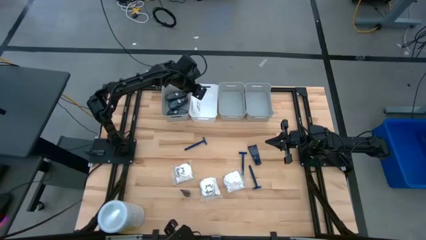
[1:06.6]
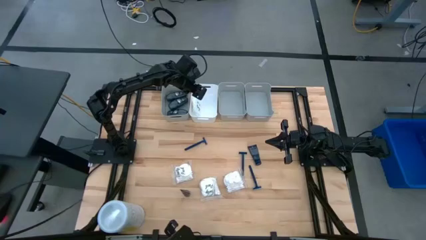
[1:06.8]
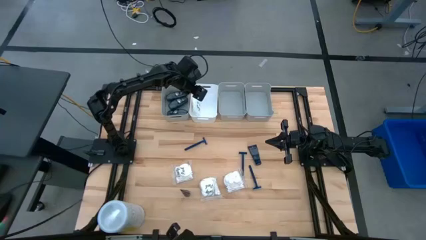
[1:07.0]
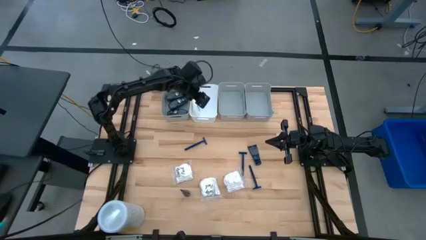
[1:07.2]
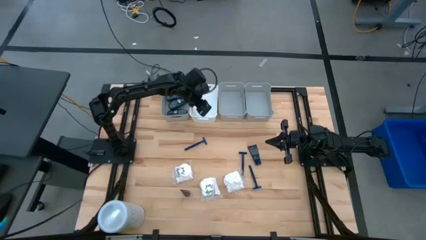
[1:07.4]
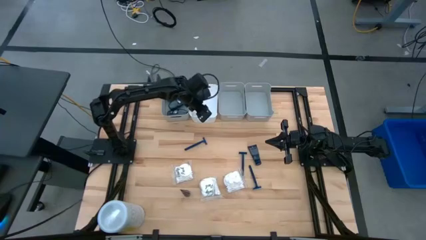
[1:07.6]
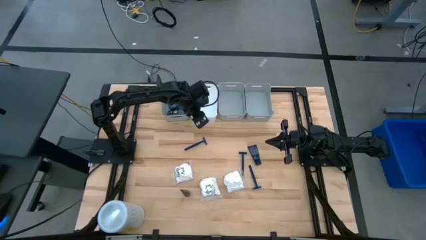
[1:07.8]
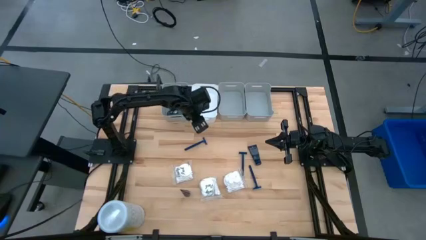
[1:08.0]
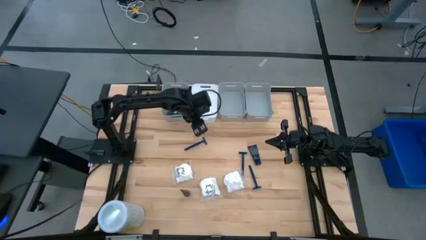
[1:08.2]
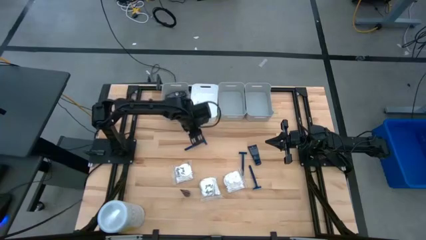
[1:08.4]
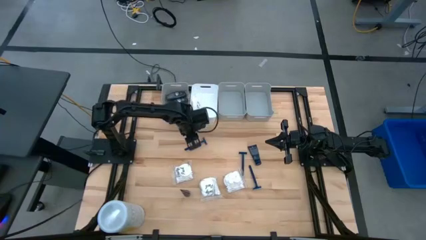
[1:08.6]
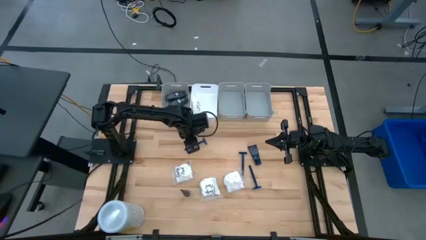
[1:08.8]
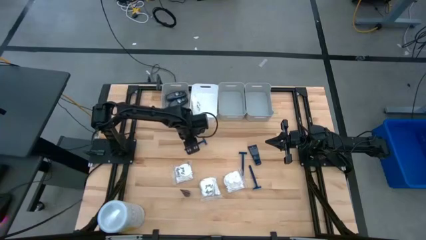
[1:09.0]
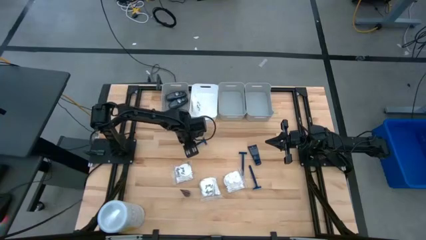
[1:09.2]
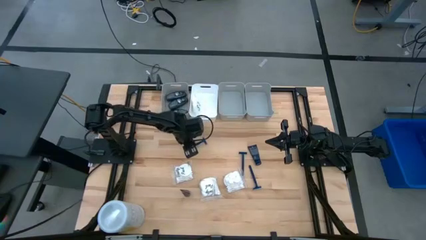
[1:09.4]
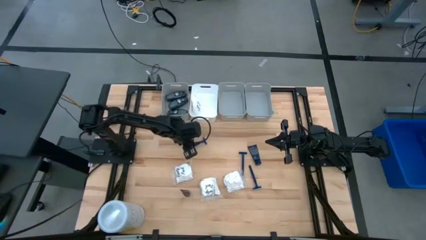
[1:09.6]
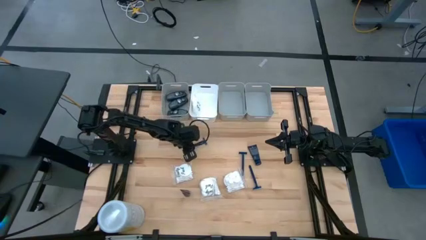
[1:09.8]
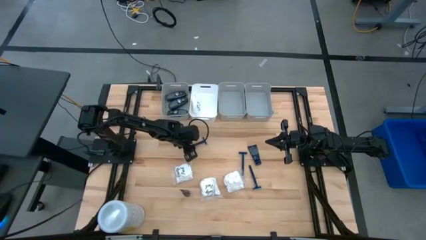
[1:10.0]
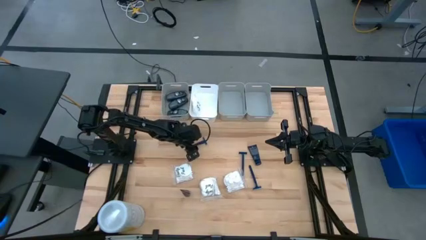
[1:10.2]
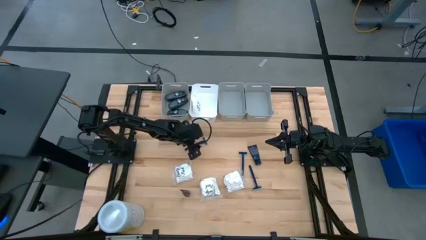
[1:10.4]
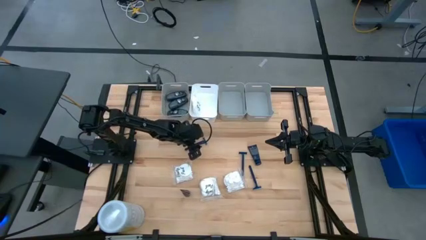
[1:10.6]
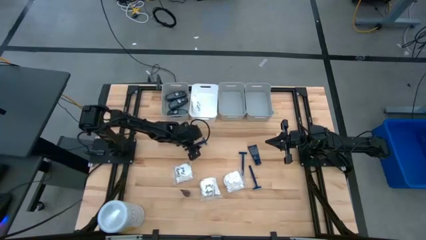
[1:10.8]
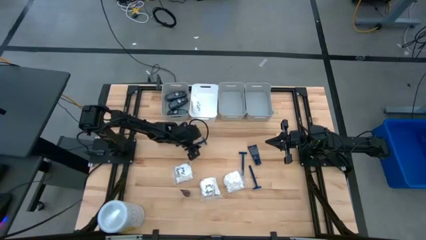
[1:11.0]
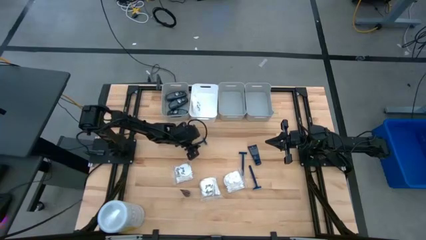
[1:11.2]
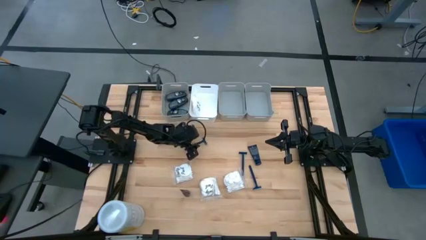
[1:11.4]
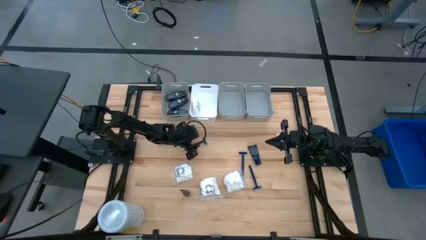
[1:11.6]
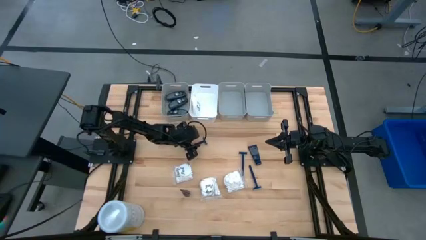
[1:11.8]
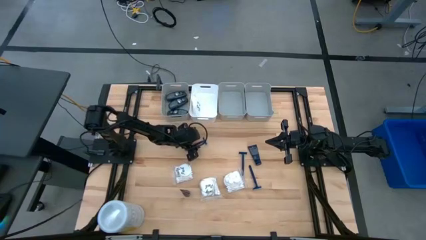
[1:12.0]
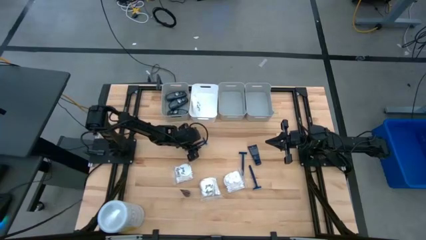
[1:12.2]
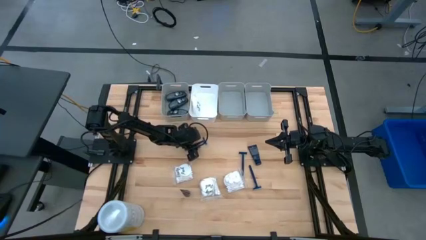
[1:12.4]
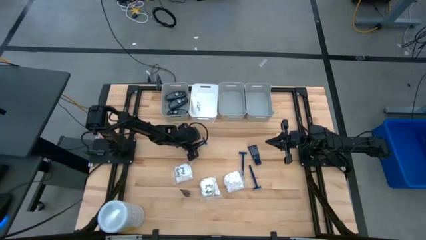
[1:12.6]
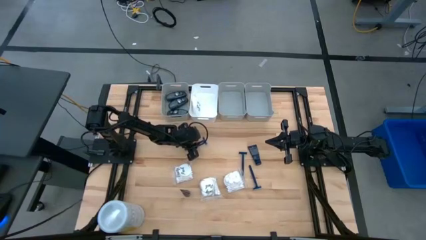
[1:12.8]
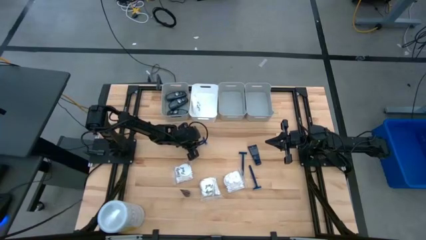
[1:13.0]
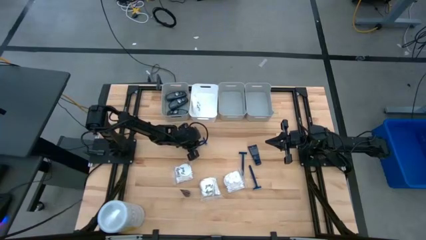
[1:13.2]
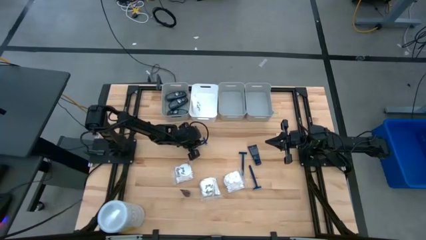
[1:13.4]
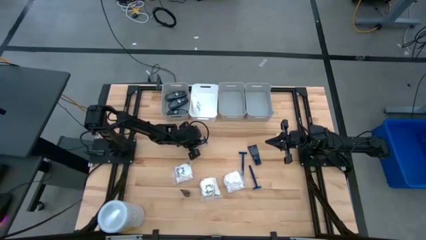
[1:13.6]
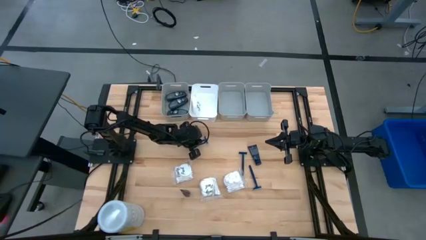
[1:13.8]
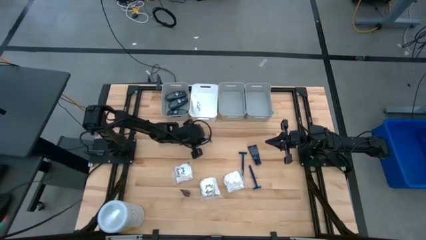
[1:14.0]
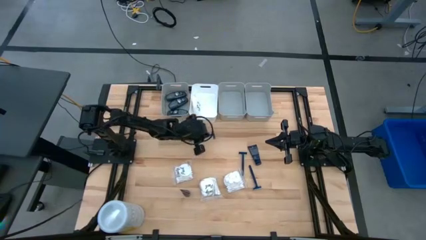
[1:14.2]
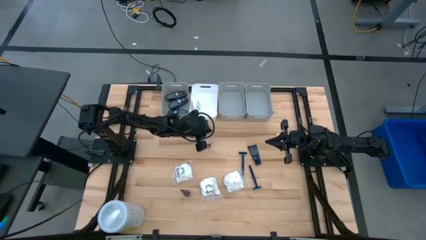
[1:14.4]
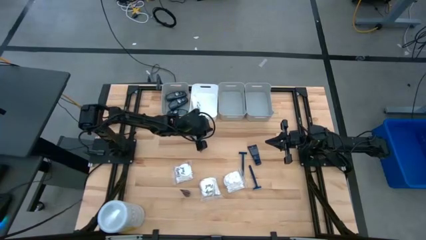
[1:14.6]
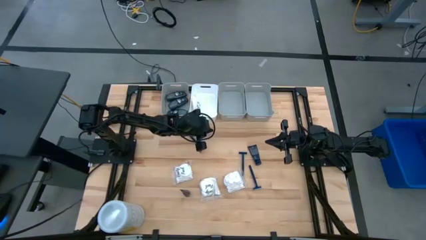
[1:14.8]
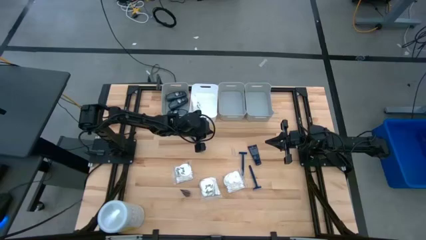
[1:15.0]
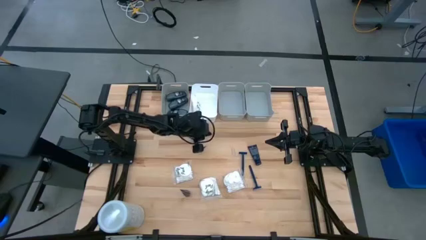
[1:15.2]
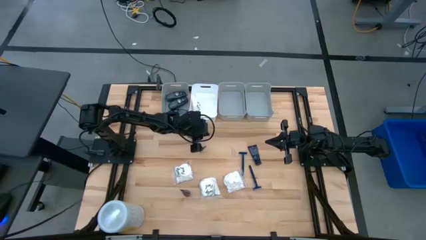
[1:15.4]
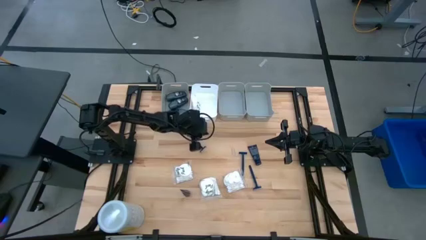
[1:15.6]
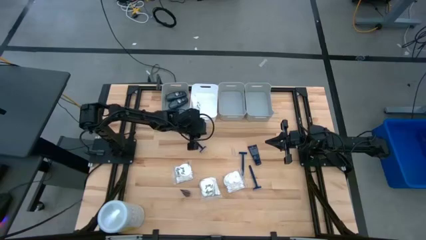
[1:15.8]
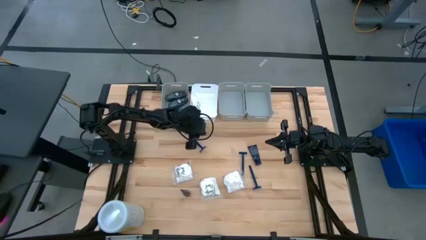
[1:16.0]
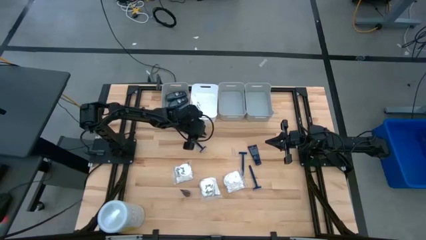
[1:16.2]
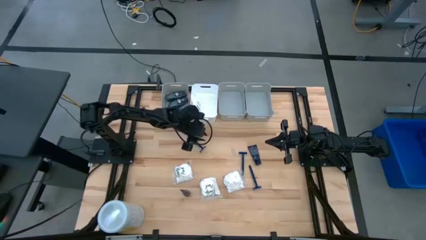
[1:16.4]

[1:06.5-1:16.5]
Task: Pick & Place Travel size toiletries
Put the blue razor into the right gray bin

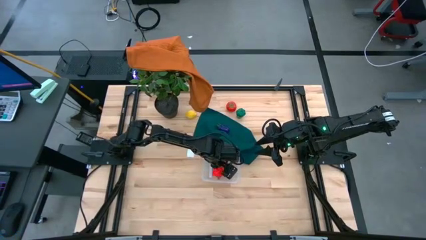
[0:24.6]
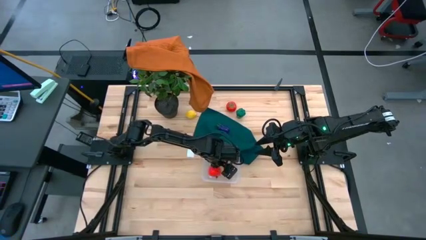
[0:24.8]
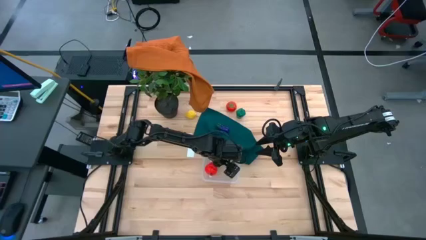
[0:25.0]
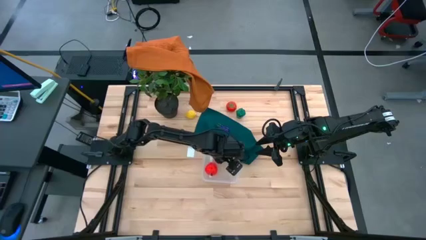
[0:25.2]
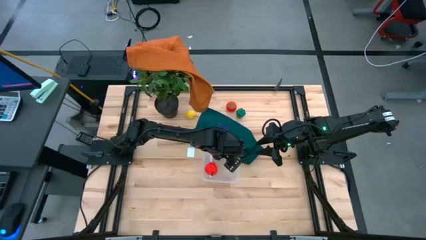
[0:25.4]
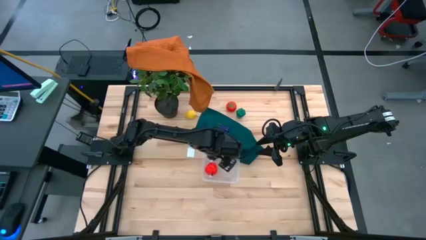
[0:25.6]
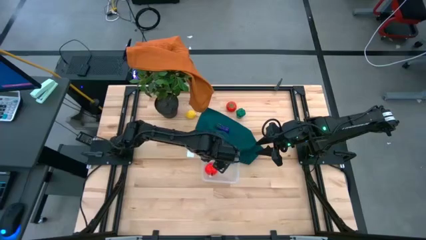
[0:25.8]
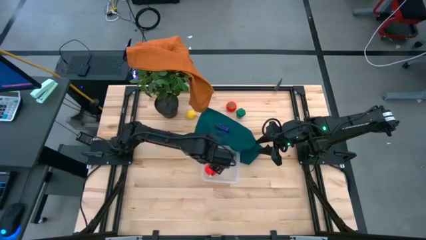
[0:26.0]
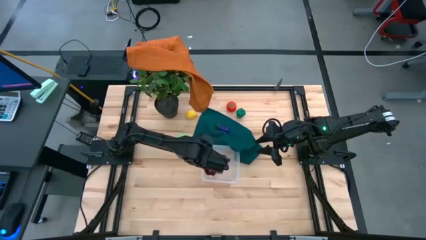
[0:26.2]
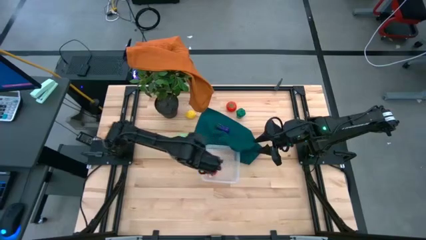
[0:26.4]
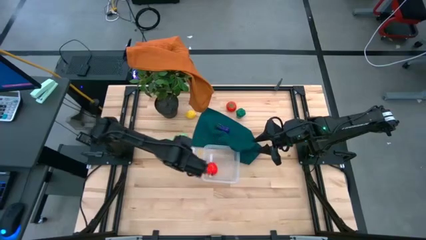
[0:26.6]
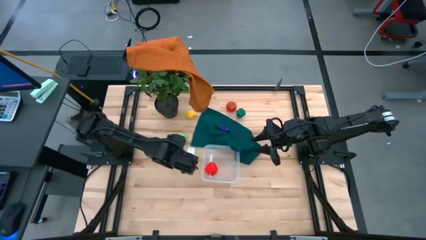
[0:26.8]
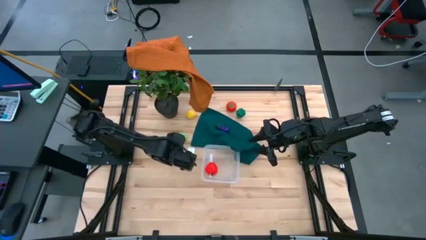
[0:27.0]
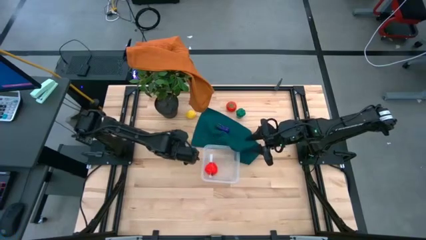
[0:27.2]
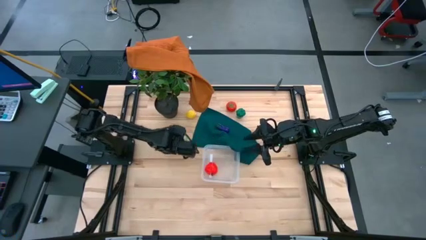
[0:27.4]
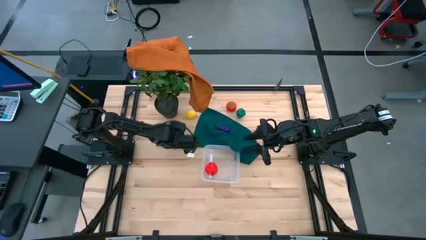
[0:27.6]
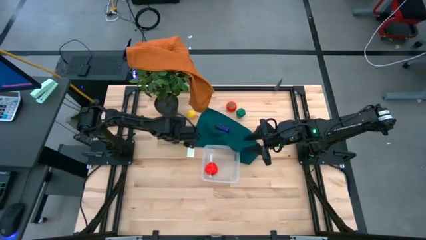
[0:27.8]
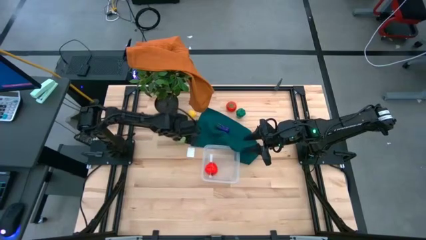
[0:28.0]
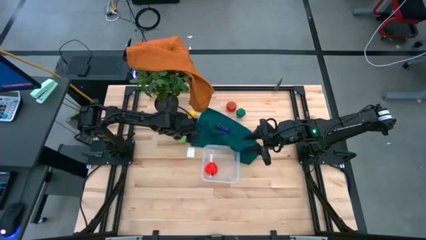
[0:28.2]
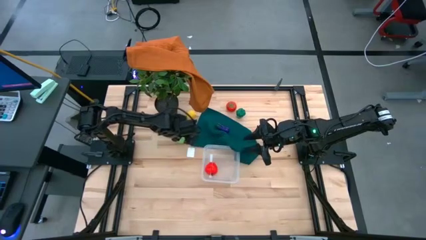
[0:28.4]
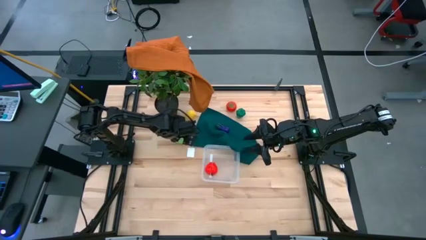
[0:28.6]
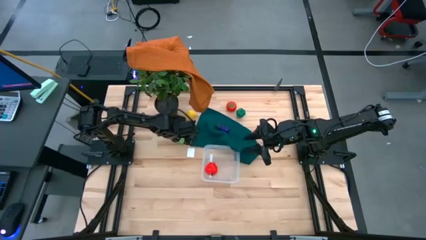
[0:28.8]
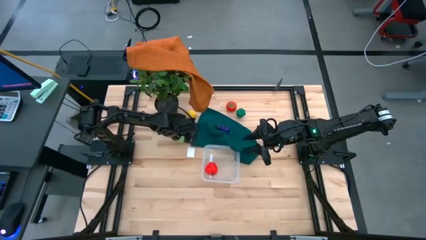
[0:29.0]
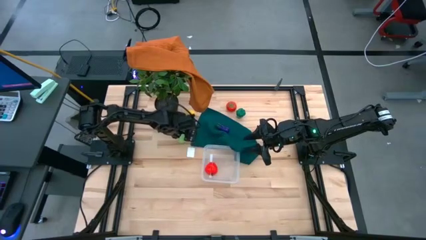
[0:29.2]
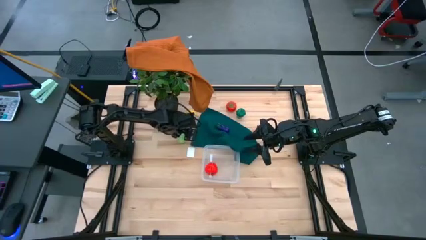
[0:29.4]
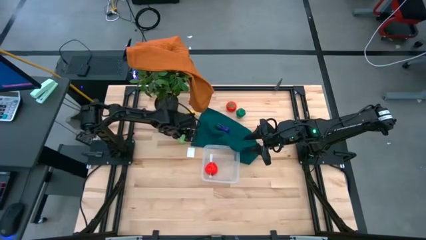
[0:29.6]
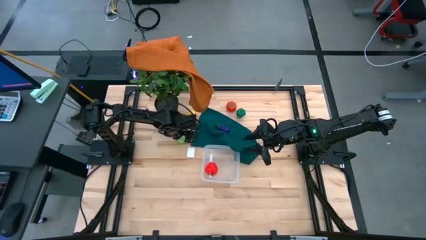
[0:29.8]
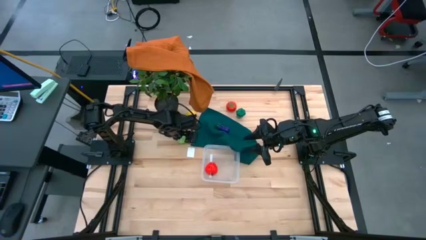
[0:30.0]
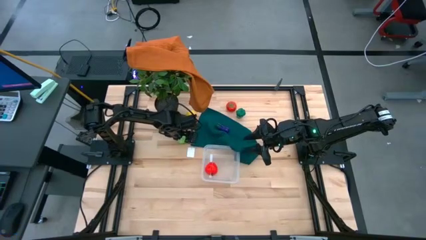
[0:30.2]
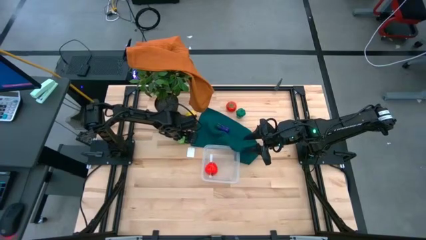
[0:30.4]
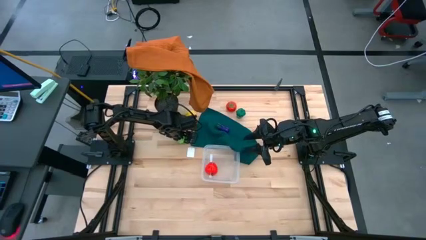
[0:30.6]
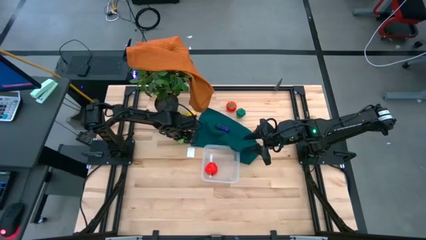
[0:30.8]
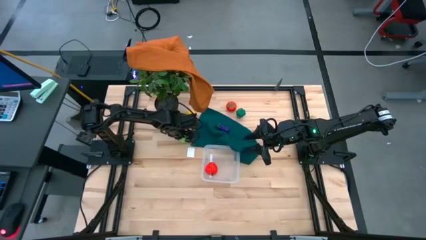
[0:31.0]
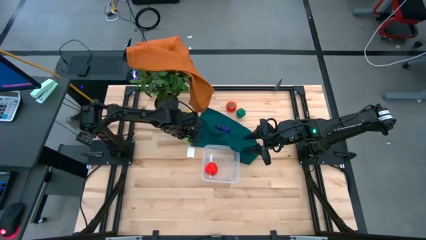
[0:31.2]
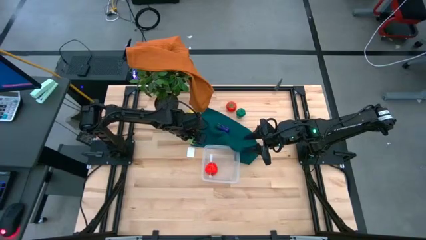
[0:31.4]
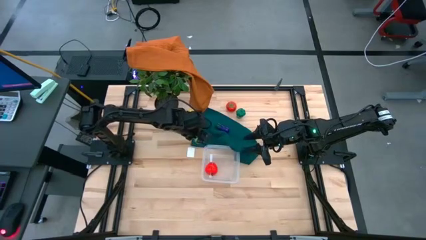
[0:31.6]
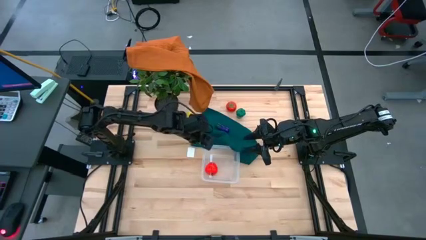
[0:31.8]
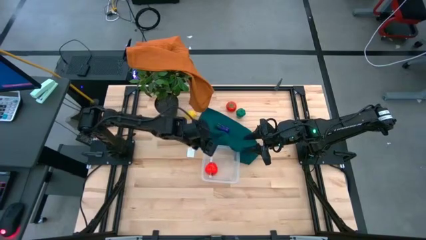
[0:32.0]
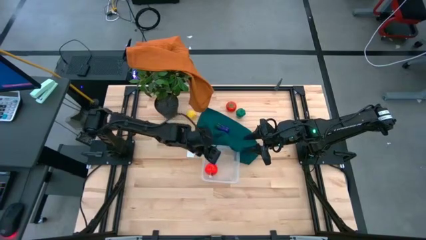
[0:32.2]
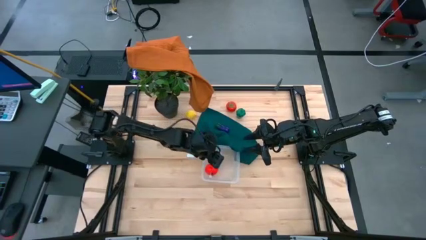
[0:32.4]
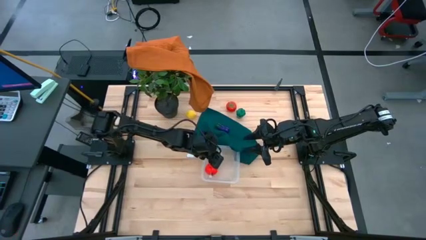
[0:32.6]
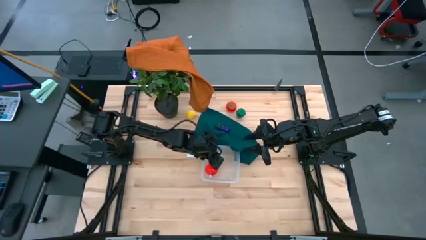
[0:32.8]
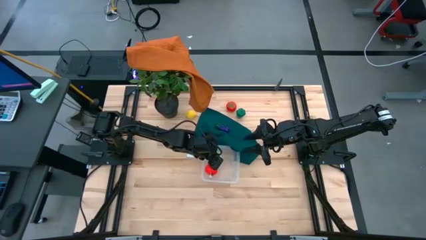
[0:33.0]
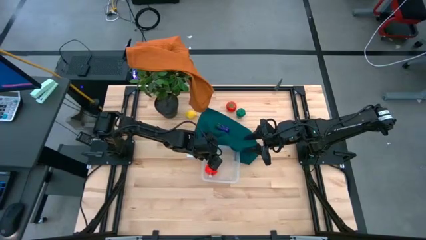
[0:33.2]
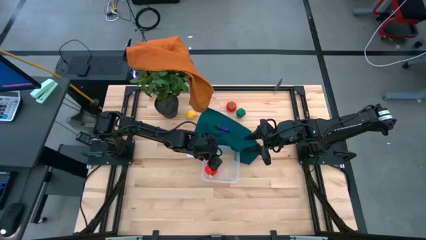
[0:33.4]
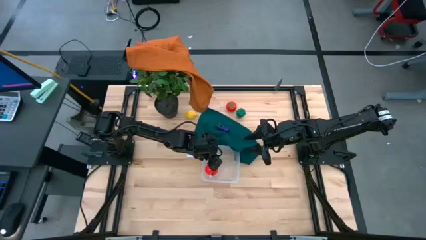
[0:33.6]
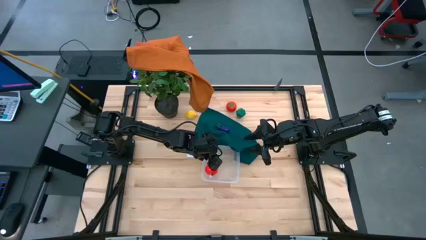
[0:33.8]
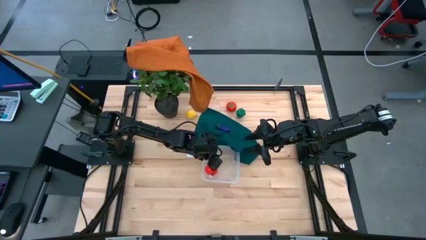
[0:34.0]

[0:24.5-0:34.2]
Task: Pick and placing Produce into tupperware
Put the cabbage into the transparent basket
